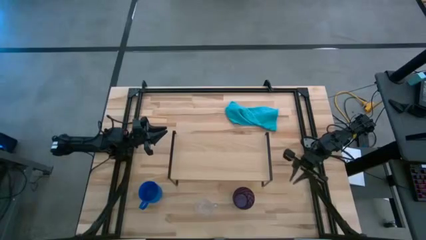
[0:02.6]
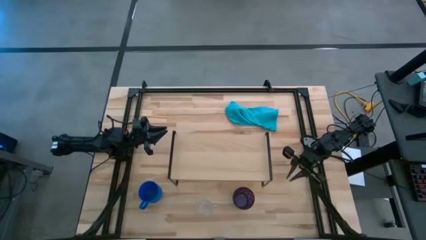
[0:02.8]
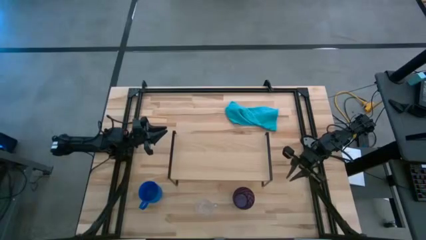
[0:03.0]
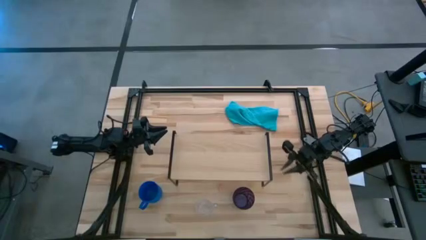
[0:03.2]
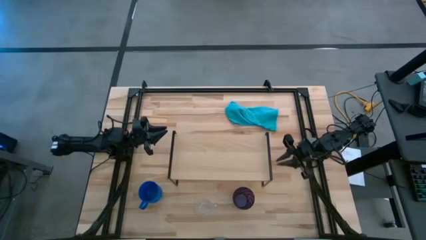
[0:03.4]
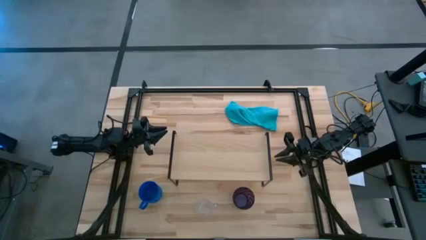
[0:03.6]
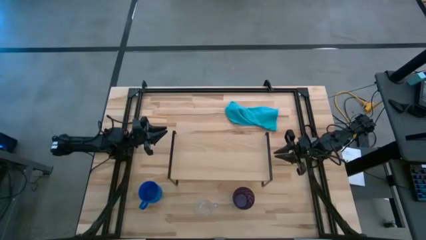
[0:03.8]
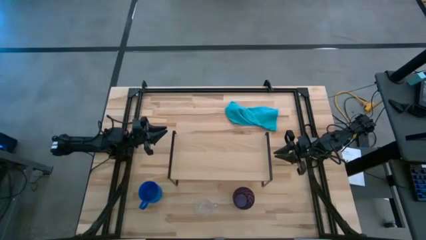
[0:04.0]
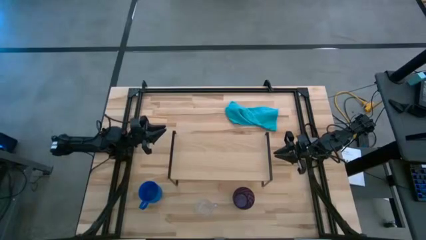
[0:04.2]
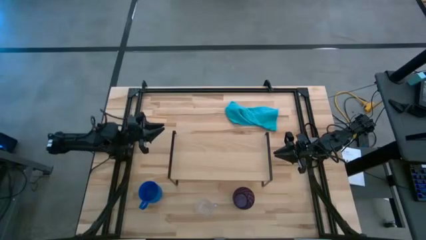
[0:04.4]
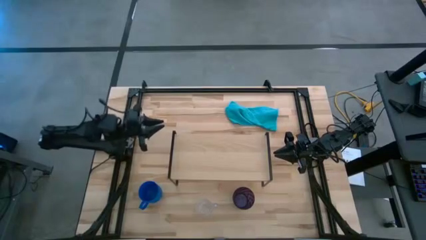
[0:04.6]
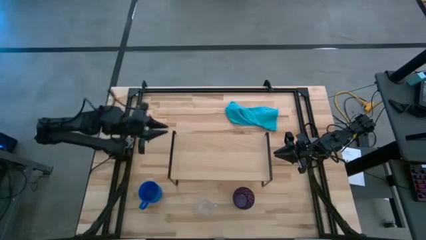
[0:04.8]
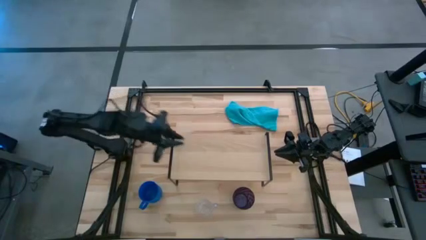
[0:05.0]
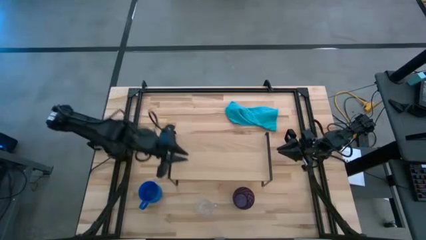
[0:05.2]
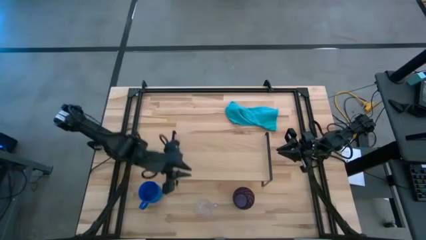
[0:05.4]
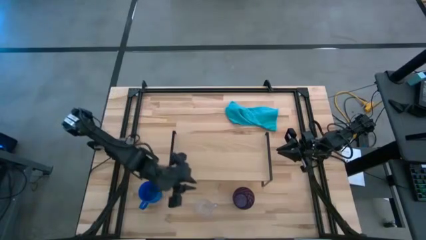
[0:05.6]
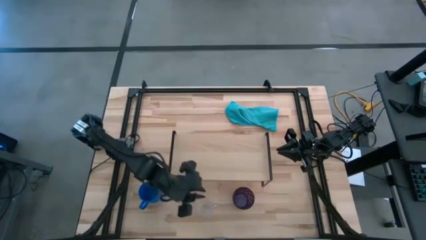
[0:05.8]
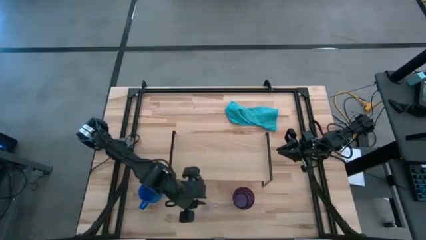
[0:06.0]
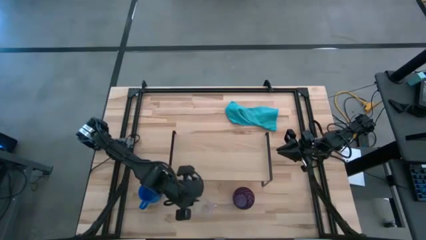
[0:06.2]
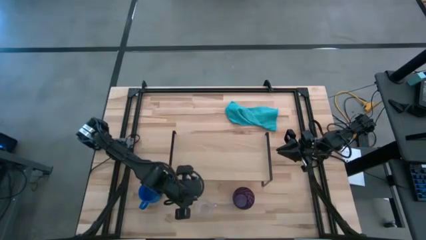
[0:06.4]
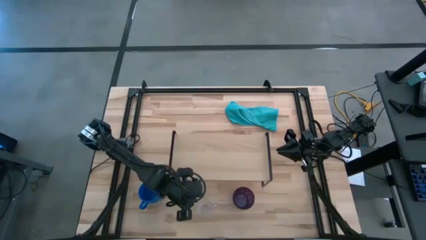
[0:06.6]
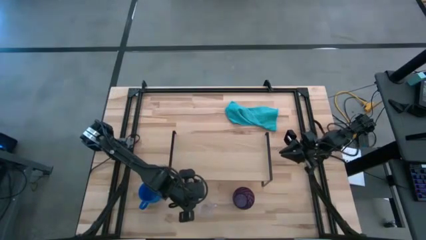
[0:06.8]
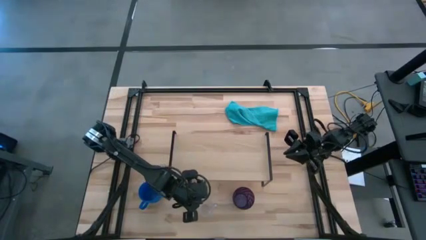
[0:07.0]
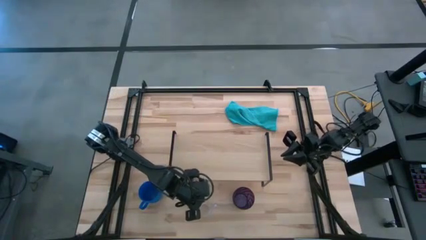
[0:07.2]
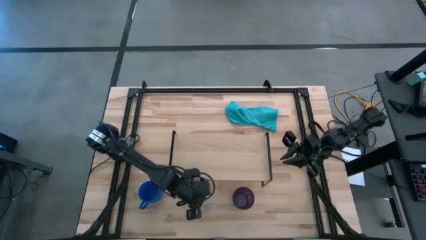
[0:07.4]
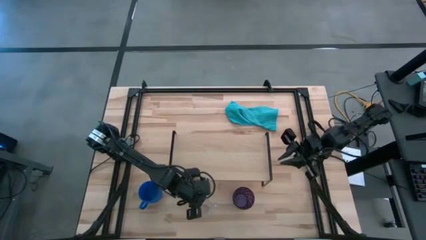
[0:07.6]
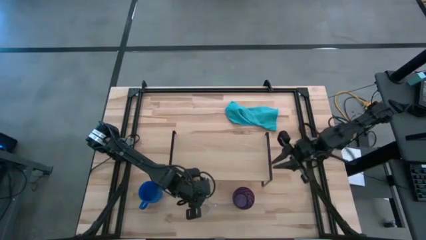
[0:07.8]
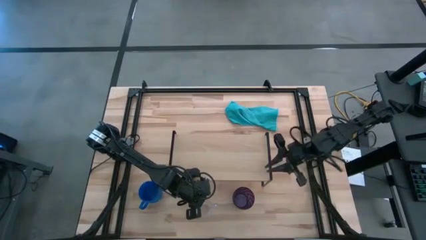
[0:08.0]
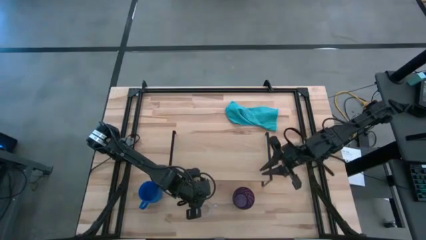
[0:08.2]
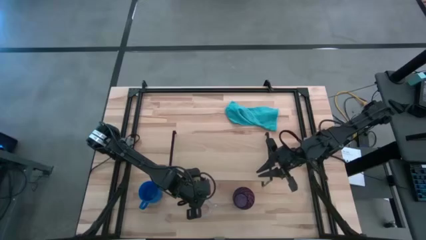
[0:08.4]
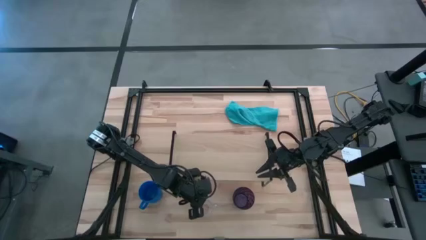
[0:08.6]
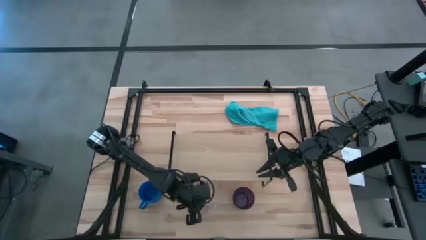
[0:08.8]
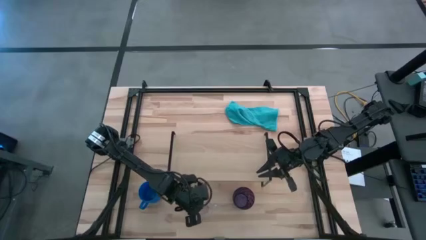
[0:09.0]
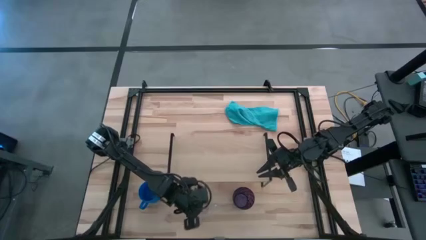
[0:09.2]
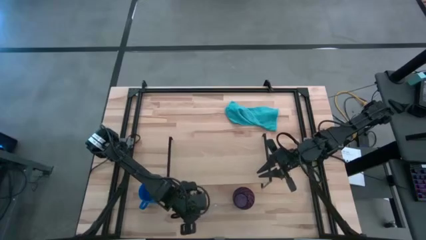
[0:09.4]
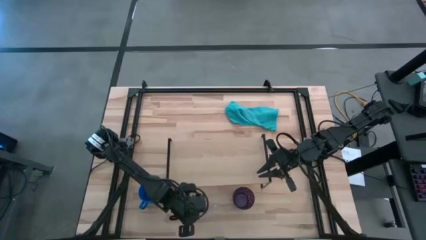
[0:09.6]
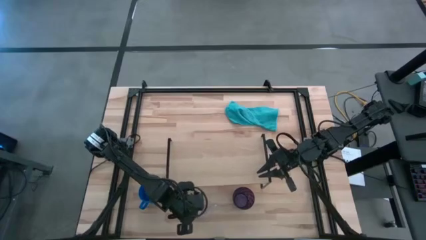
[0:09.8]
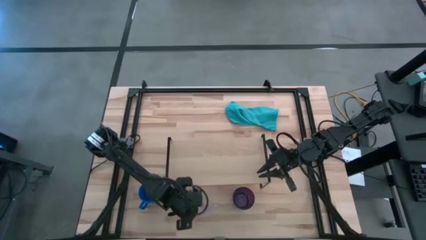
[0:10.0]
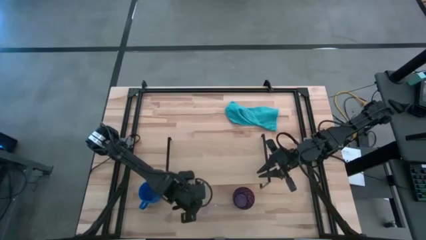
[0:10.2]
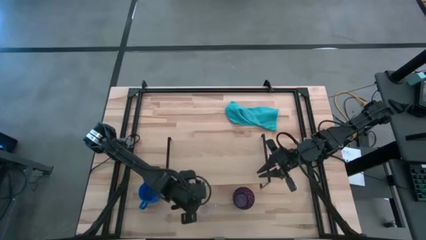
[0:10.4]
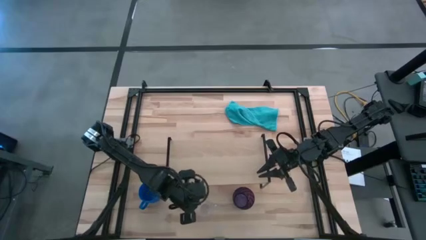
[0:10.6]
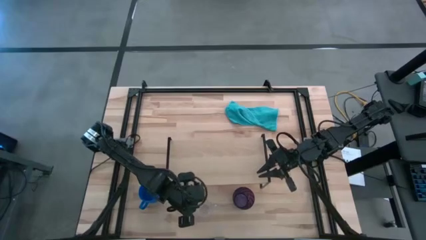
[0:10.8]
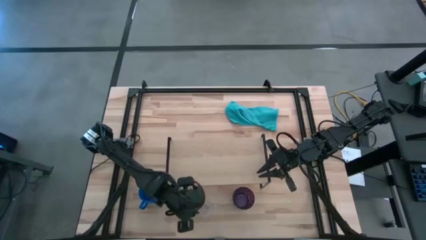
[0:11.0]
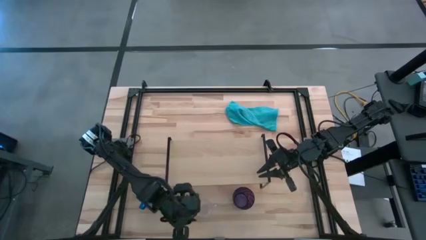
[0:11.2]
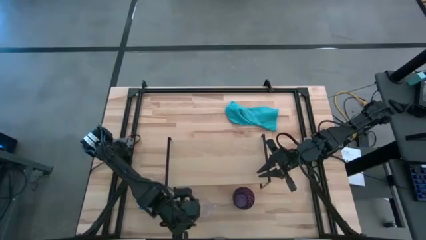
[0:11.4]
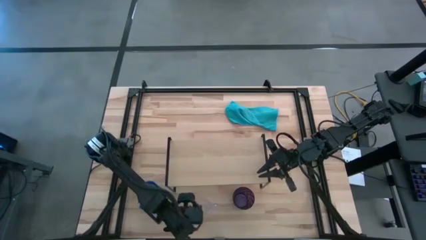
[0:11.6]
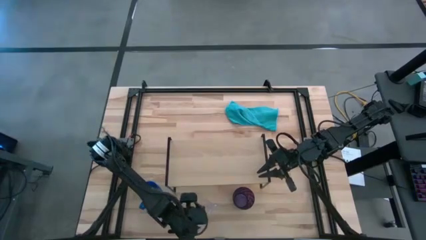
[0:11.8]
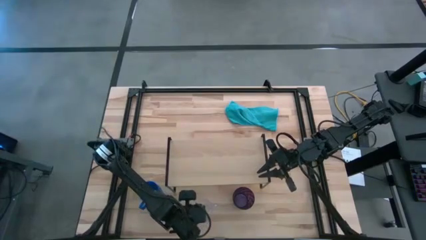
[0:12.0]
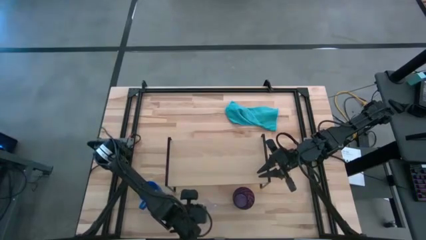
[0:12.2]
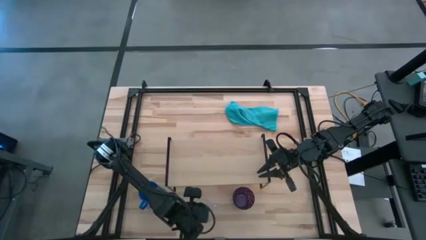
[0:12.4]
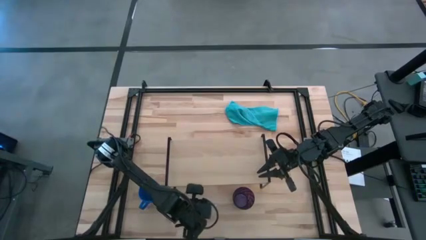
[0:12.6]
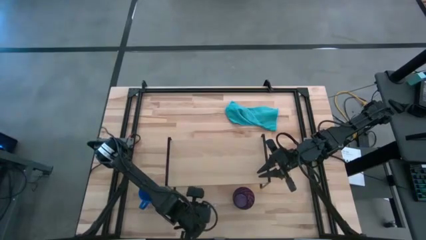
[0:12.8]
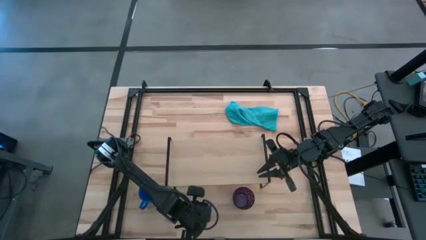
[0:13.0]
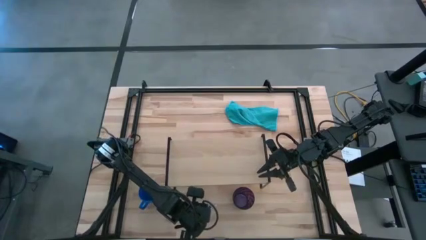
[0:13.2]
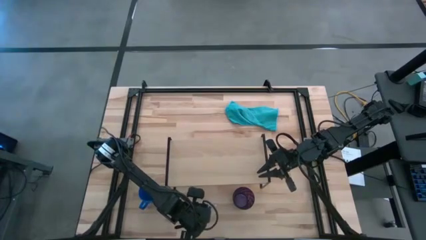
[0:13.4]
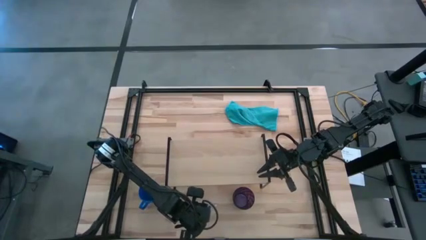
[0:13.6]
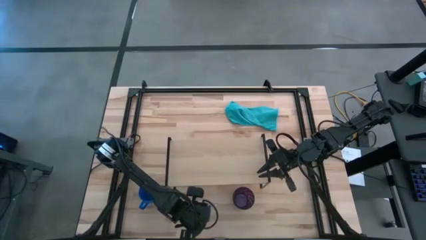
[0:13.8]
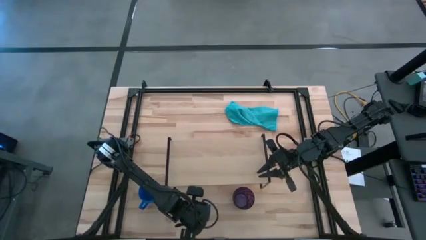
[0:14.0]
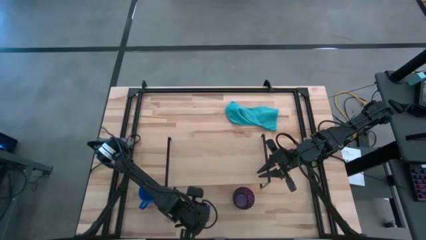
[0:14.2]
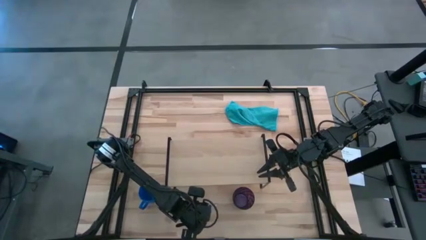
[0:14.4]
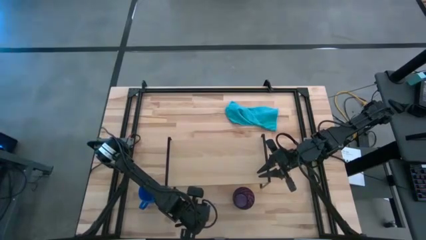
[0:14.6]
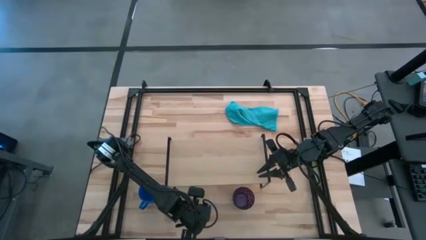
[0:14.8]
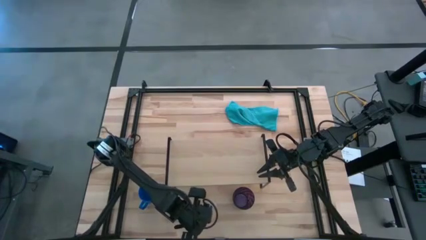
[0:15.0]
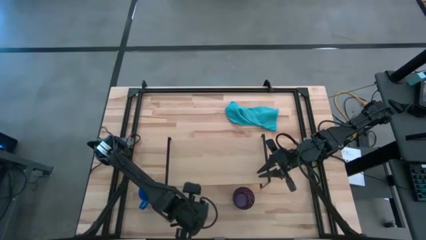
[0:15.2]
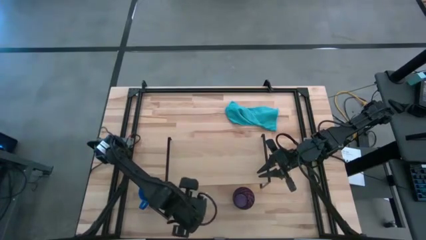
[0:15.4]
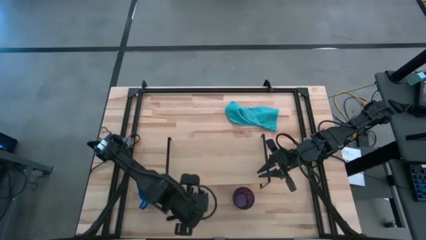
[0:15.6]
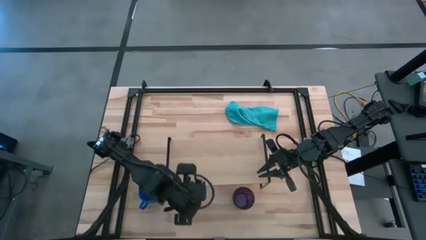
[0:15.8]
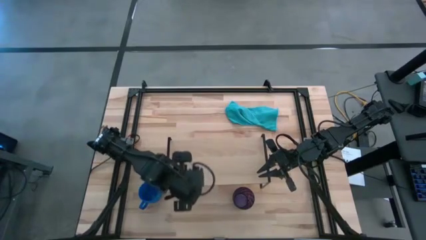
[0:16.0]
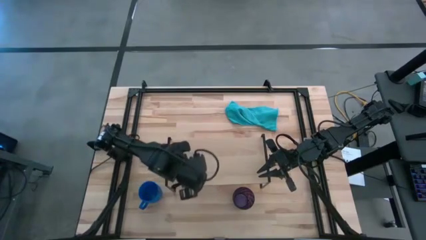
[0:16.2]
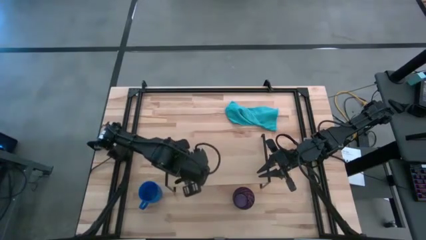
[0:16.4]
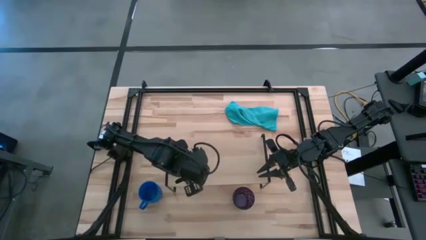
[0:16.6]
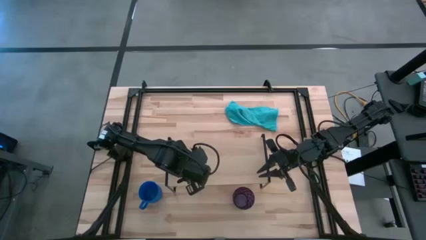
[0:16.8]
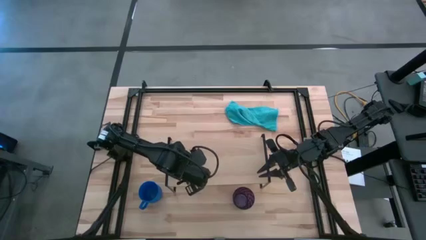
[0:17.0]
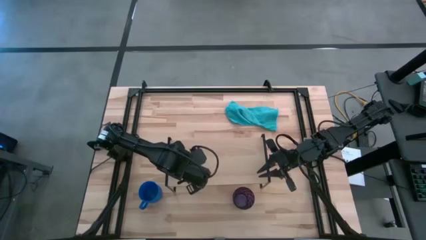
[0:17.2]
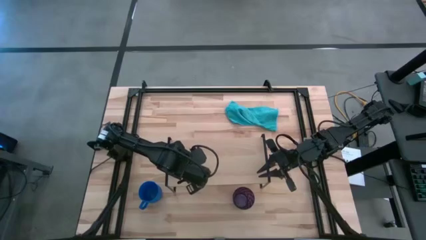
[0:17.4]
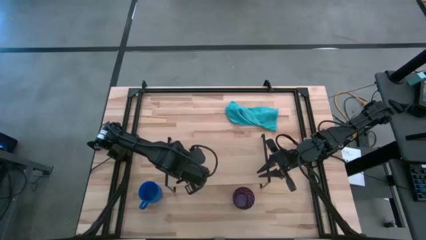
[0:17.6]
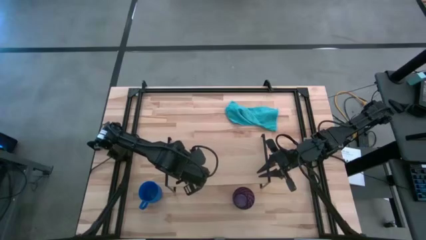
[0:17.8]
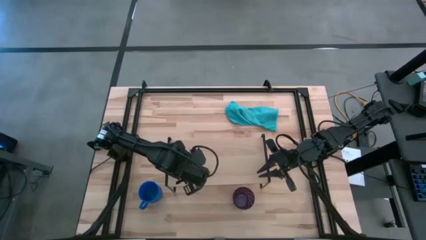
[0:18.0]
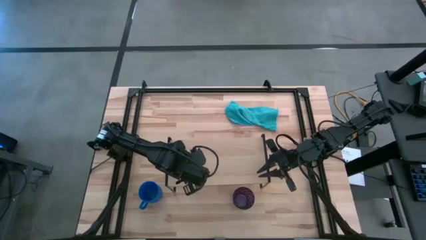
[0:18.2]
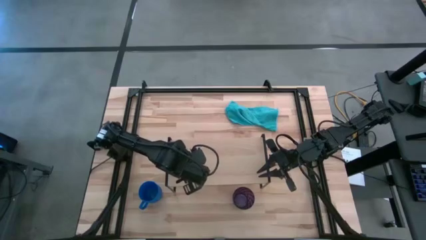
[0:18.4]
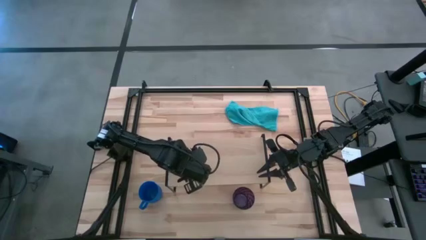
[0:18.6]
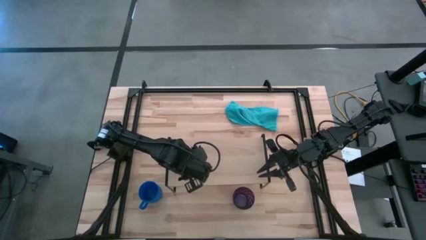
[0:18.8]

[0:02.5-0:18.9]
Task: Stack small to large cups/mugs on shelf
Put the transparent mug on the shelf
